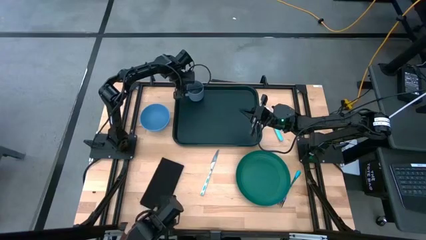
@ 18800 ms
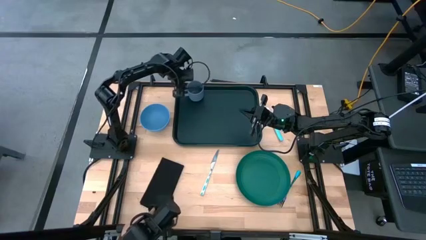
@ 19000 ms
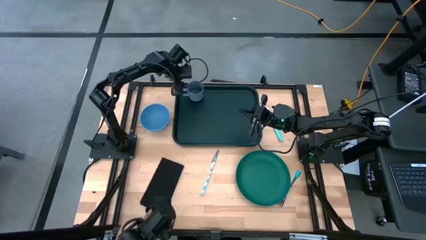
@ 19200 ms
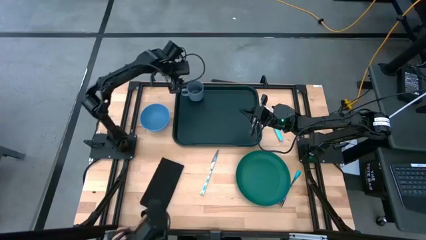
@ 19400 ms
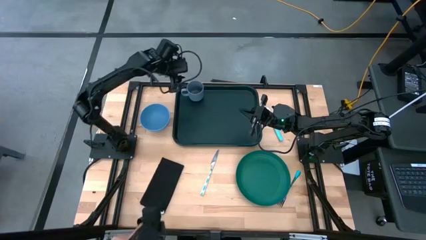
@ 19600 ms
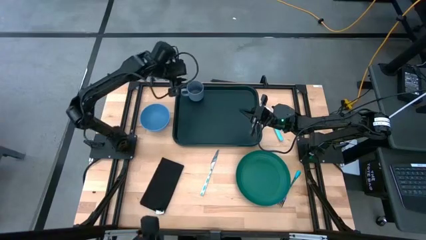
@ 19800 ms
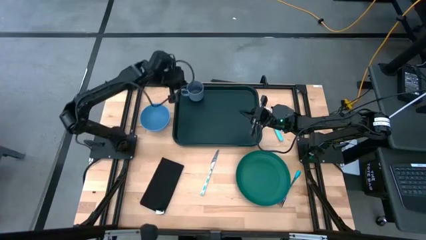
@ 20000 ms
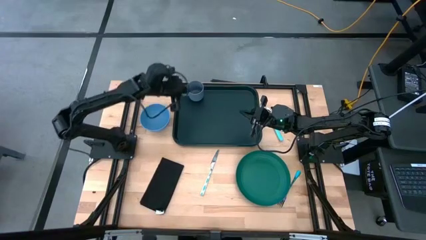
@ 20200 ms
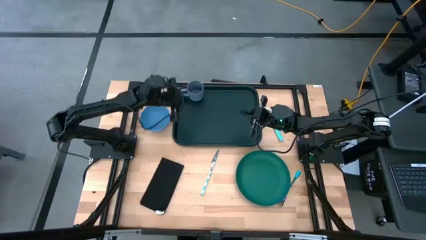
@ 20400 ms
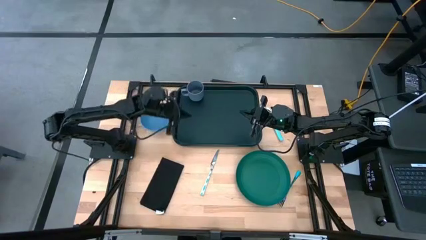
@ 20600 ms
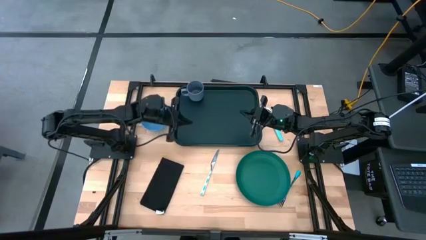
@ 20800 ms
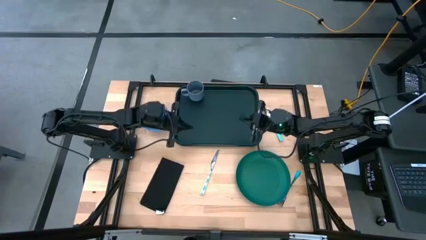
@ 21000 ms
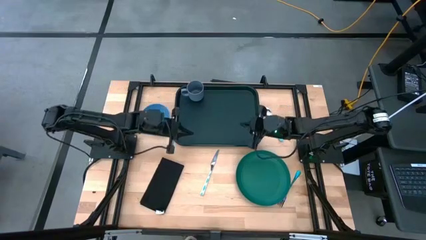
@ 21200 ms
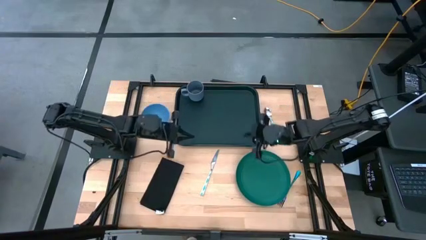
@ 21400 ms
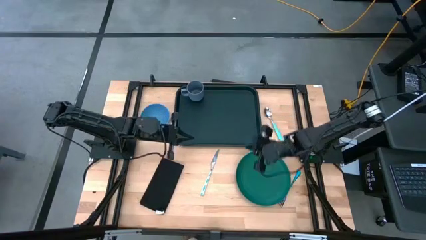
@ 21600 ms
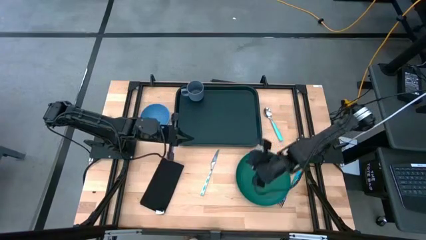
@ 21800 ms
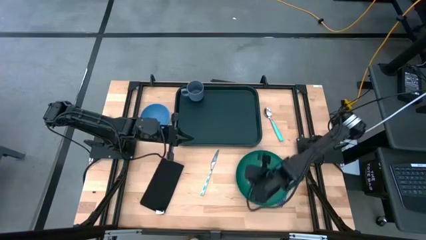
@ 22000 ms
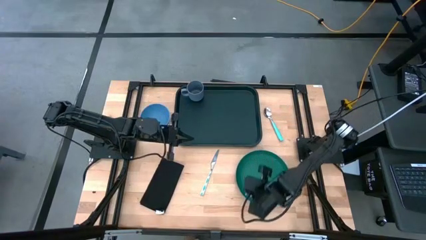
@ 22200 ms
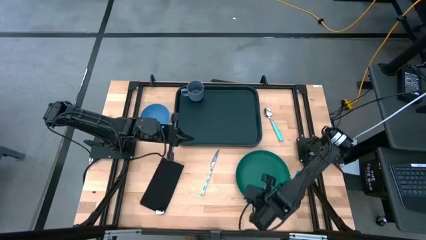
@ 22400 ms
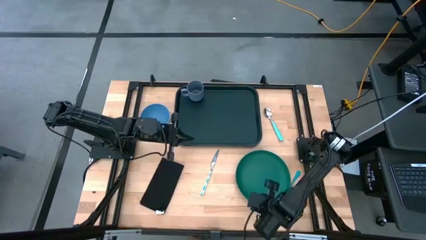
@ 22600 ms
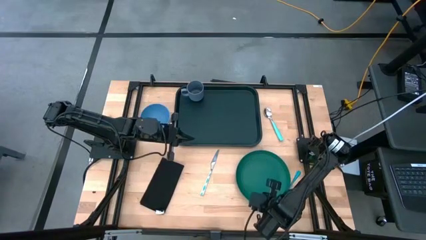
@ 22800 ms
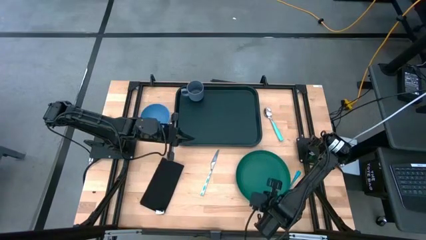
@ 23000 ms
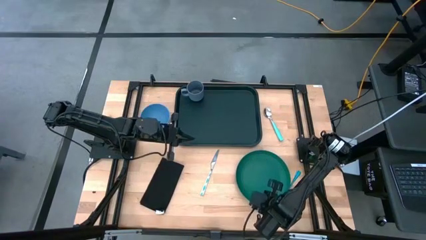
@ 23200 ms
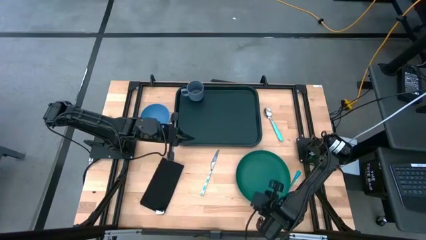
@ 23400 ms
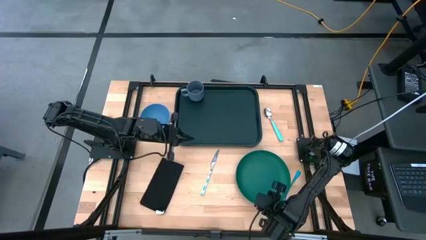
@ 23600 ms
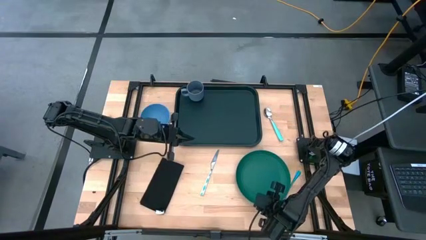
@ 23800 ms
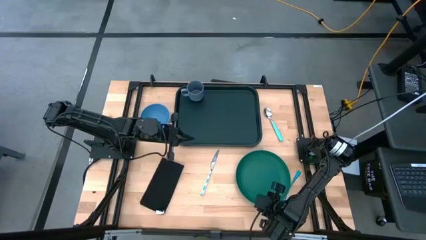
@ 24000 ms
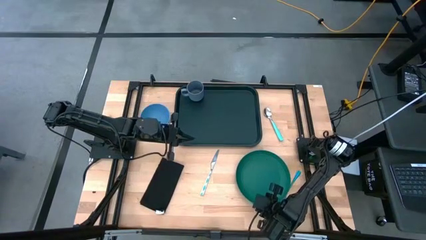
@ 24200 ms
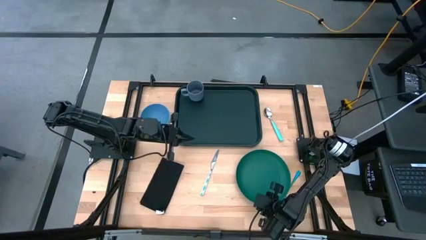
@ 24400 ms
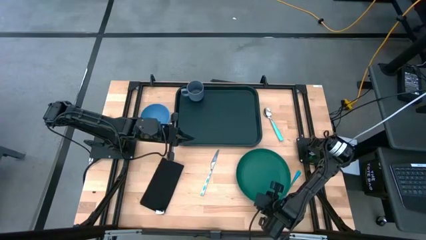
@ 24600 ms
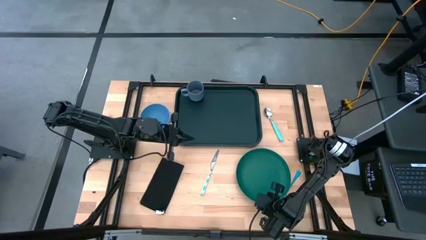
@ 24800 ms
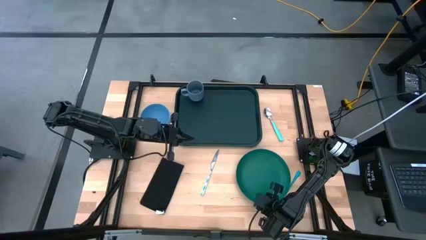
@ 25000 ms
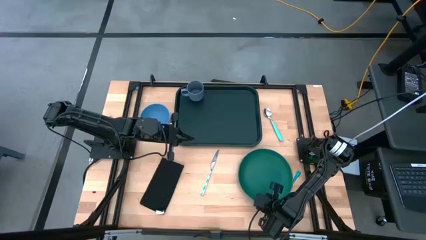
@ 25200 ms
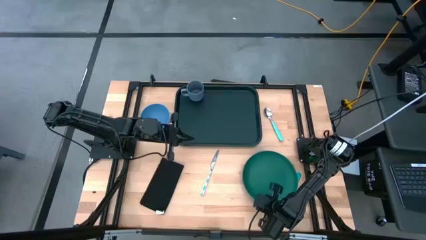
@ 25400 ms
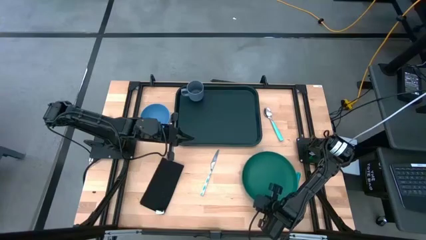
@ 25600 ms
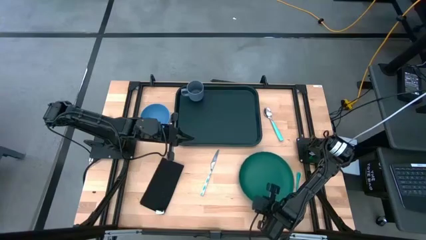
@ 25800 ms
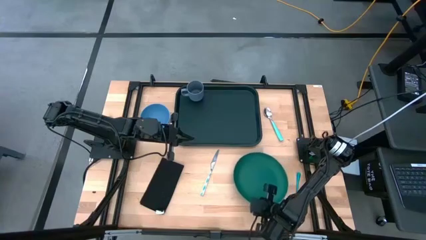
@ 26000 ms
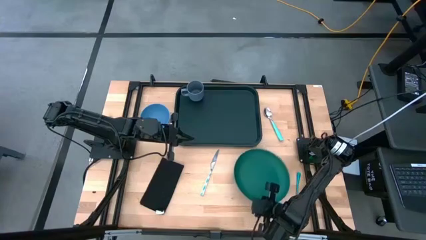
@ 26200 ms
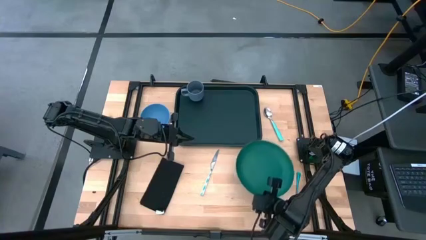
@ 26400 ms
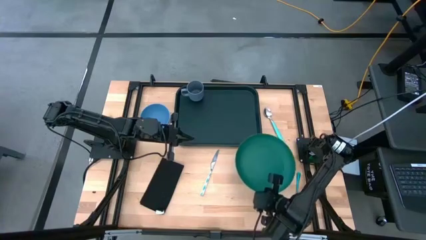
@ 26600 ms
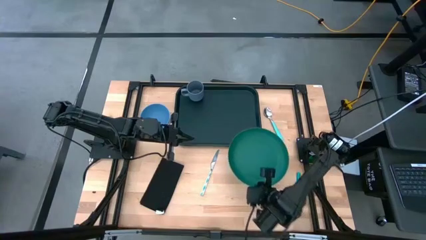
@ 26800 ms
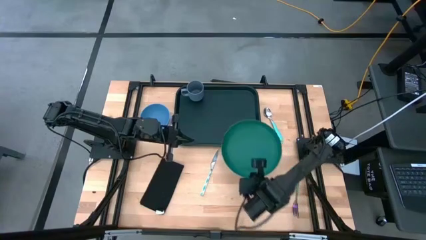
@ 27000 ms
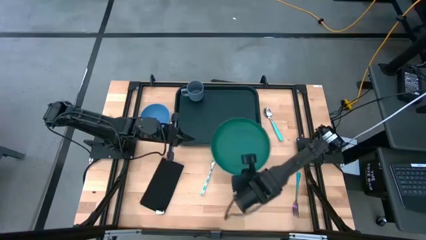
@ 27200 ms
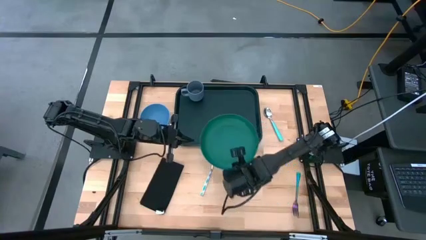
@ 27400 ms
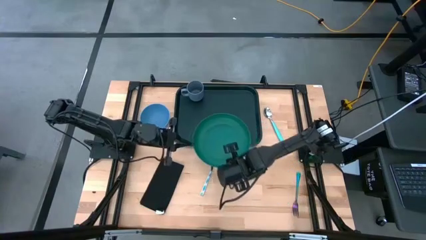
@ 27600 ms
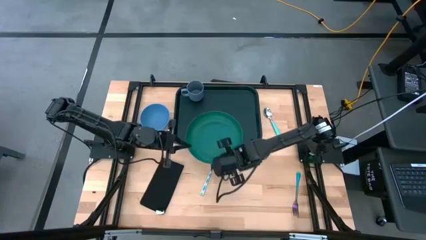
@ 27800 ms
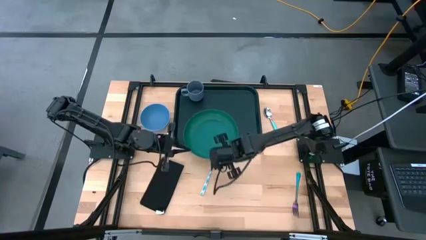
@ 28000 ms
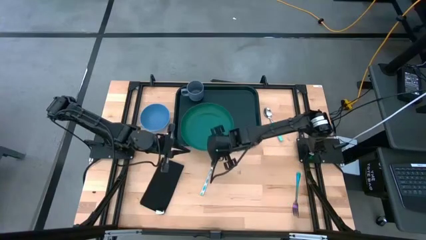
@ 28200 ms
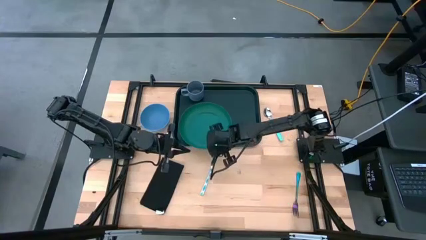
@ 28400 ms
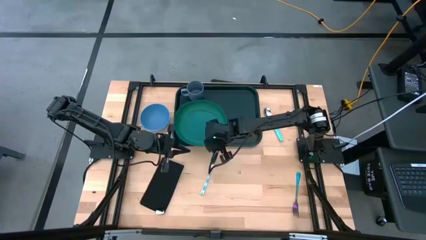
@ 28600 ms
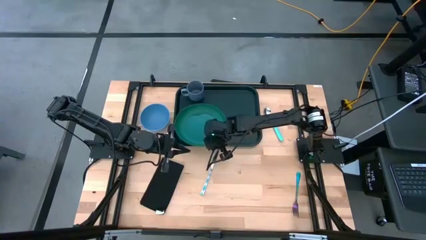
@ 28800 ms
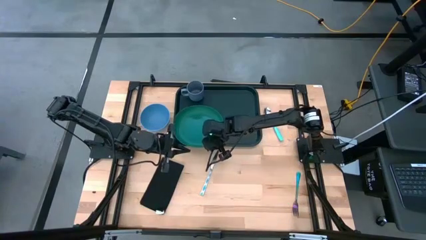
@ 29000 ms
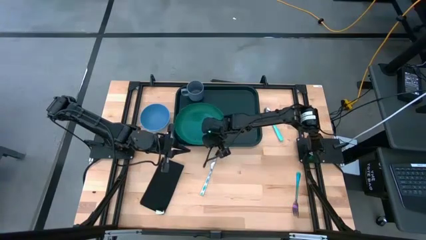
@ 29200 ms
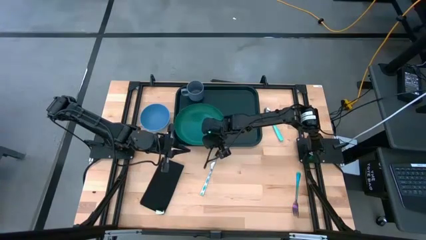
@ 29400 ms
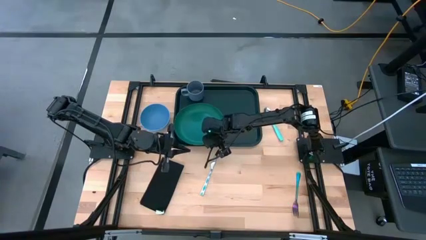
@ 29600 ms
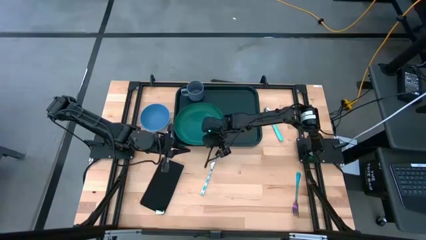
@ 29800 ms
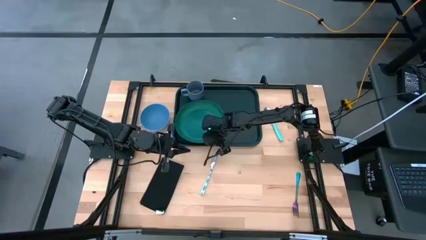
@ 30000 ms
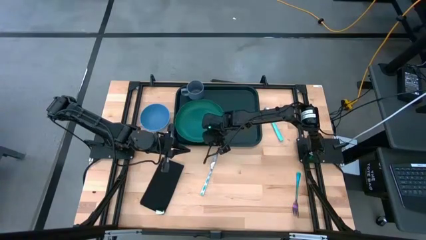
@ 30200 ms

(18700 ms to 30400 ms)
Task: Set up tray
Put the green plate on the green tray
